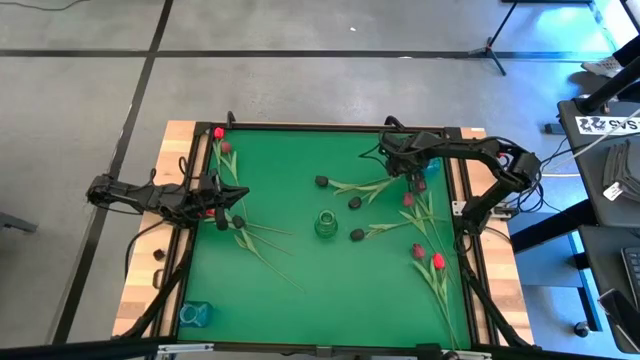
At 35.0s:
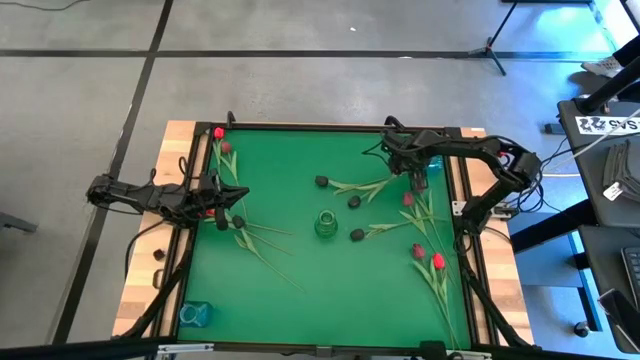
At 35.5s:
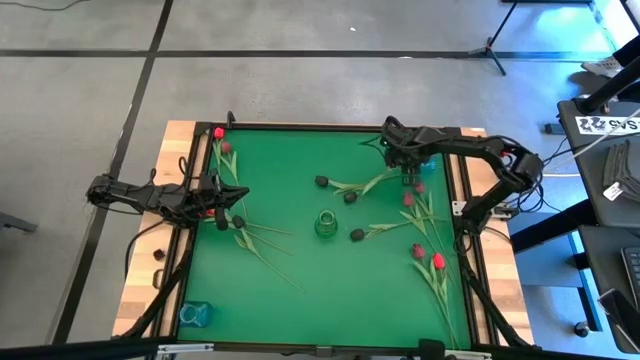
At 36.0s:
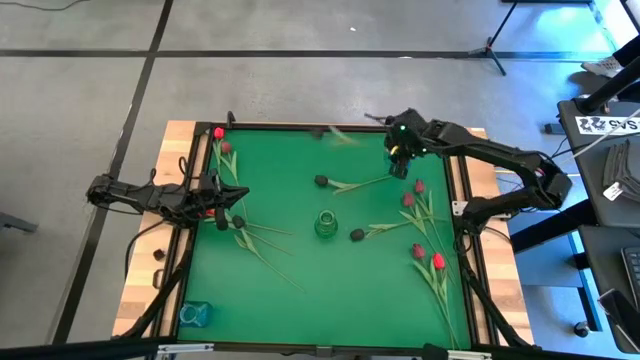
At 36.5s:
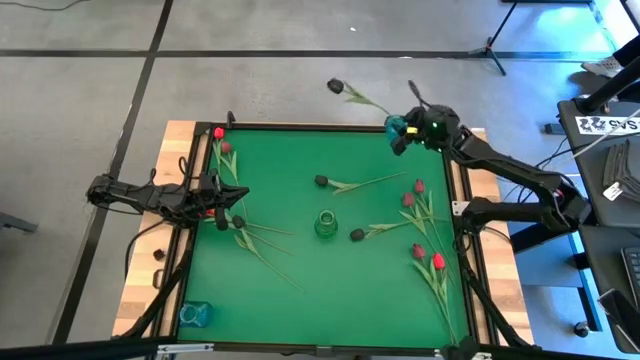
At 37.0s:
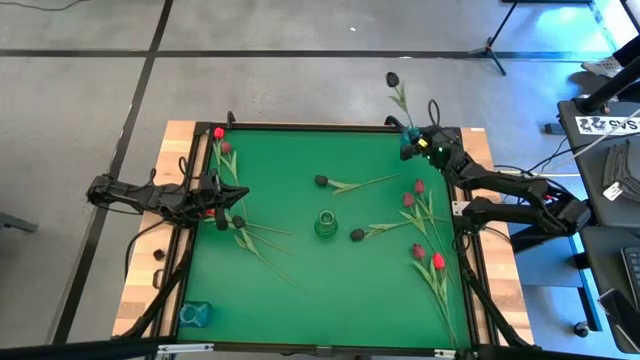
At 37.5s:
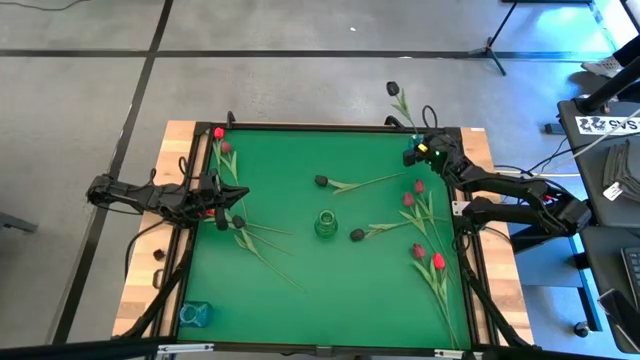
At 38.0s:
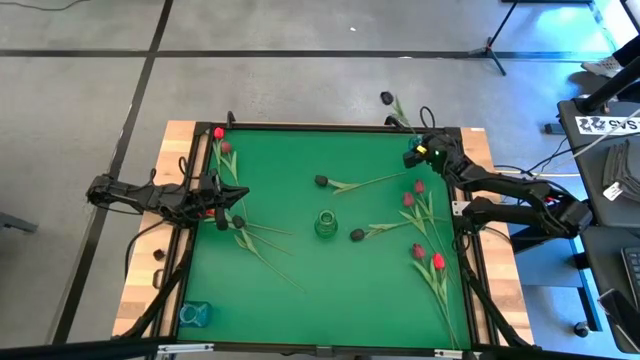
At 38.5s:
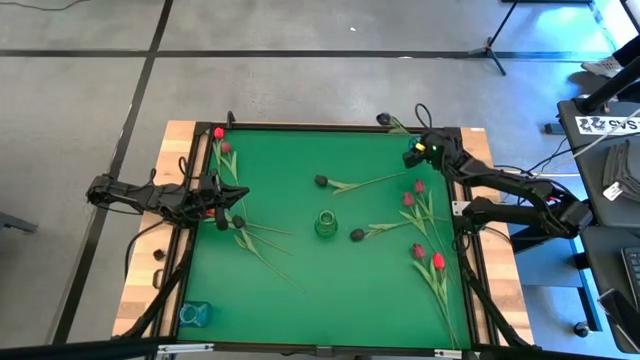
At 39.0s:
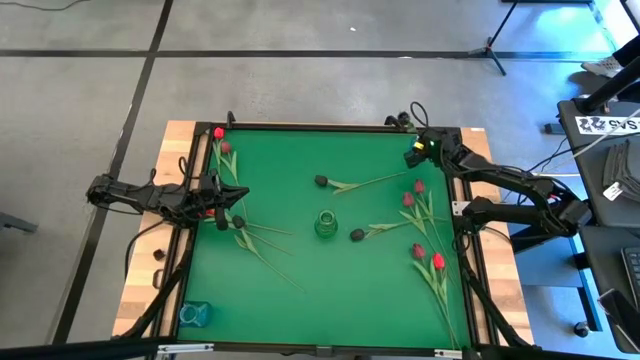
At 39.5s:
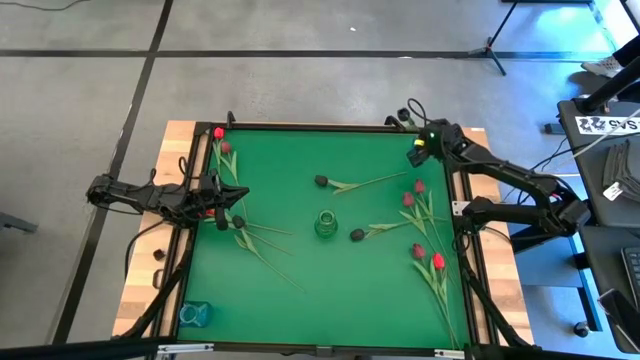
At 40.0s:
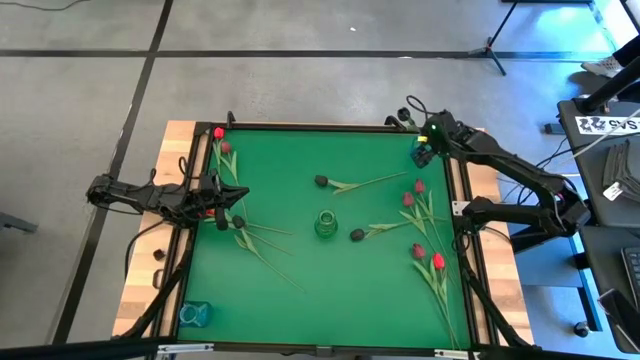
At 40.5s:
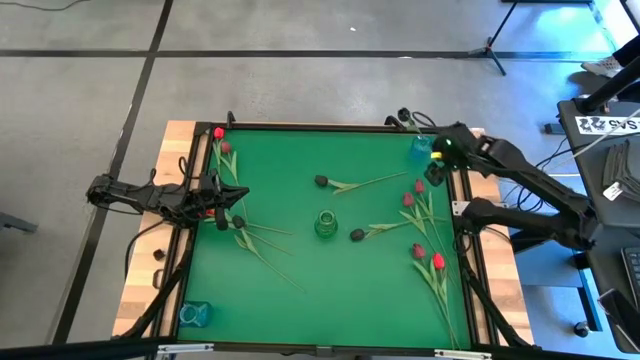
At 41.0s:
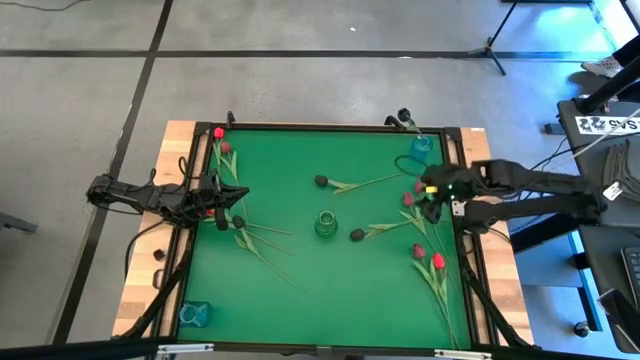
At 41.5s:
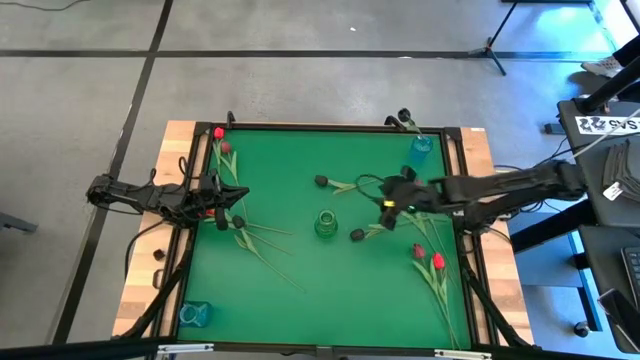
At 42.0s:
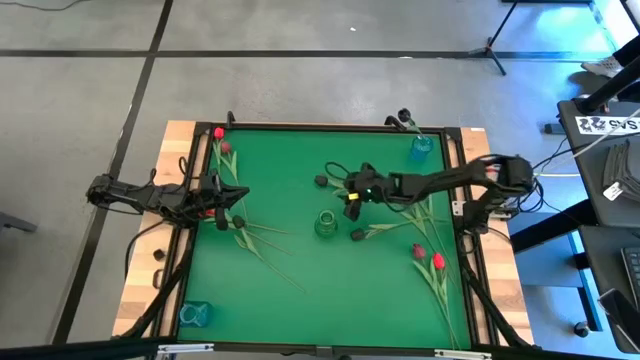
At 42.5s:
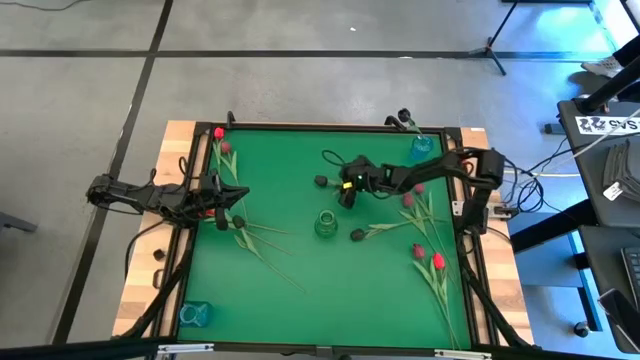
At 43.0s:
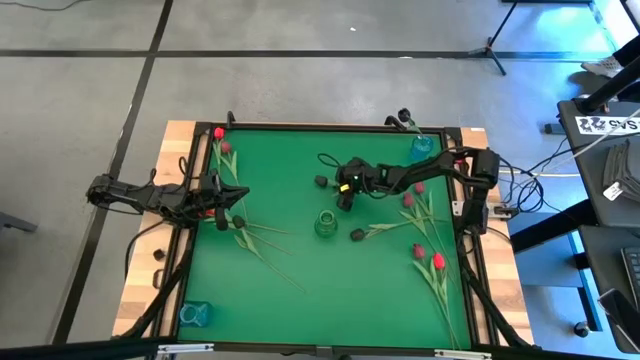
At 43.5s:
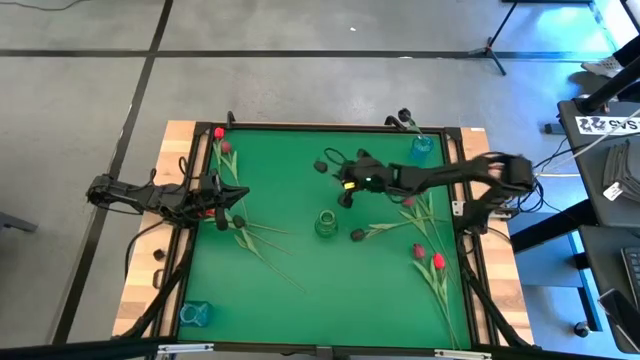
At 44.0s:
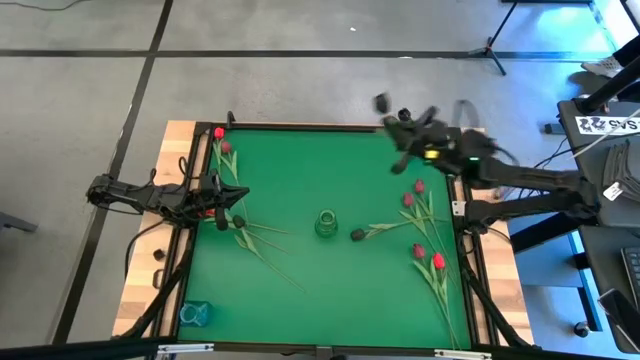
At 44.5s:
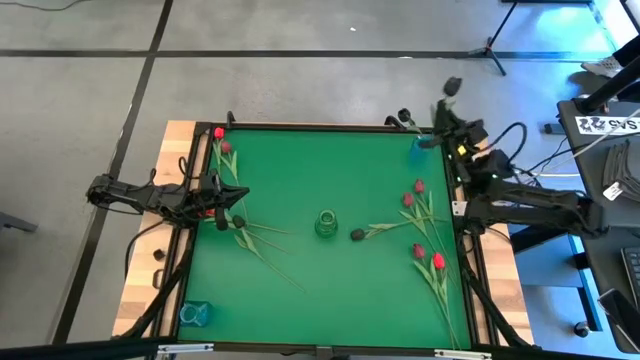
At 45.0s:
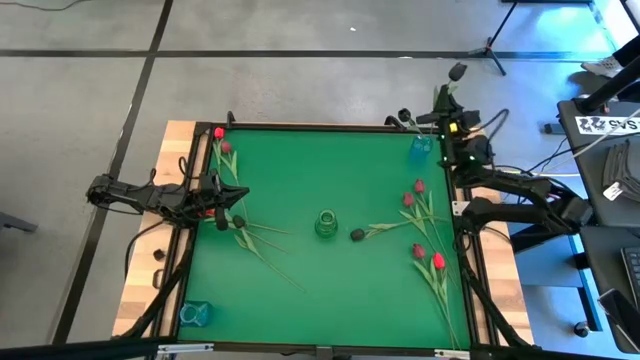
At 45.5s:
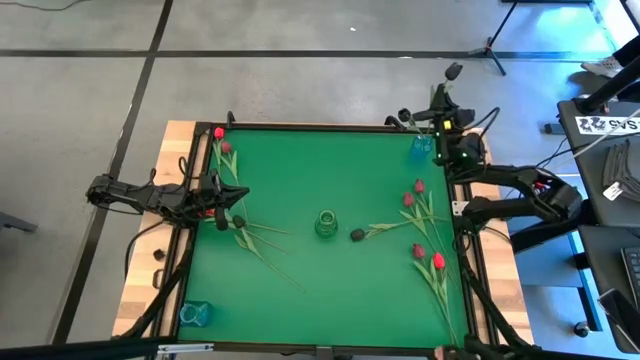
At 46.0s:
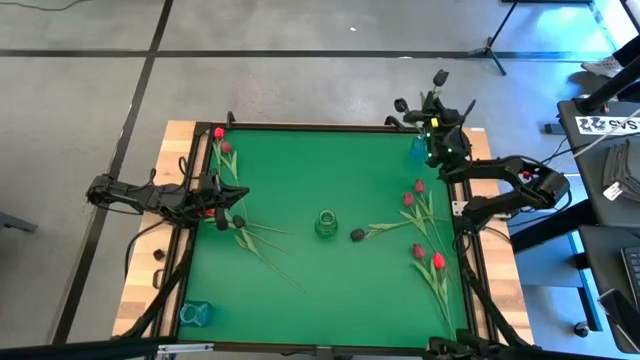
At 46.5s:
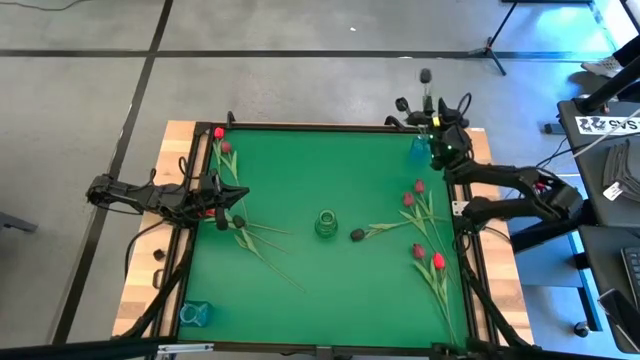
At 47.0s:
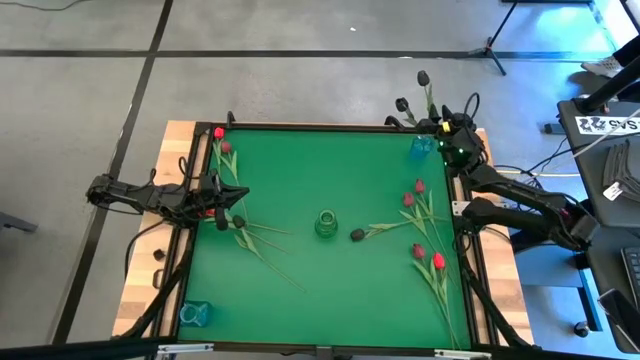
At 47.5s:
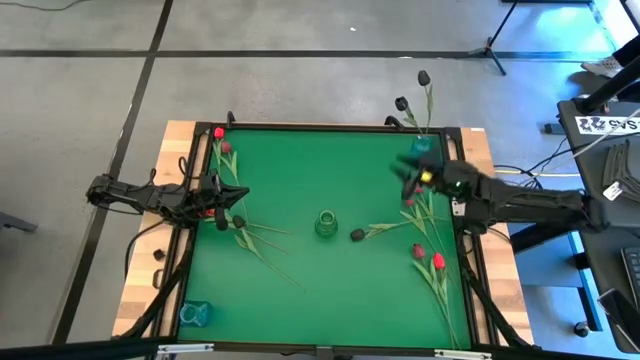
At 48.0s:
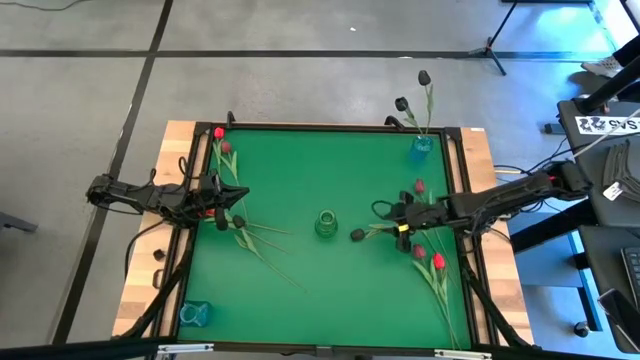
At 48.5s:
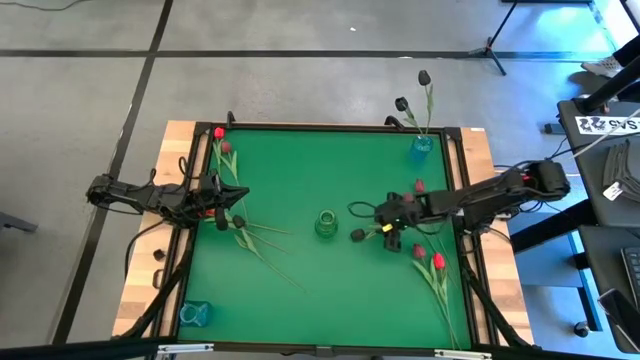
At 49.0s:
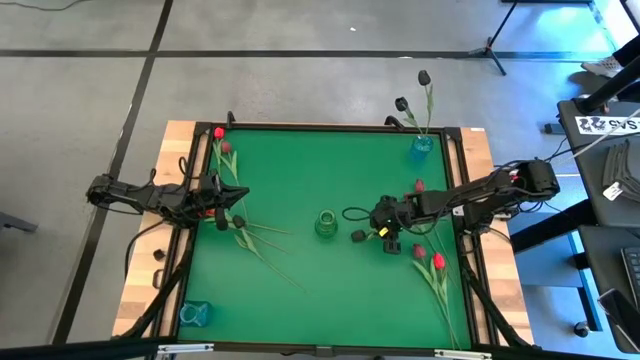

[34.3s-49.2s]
Task: Sort flowers into vase by color
Put the right black flower into the top right blue vase

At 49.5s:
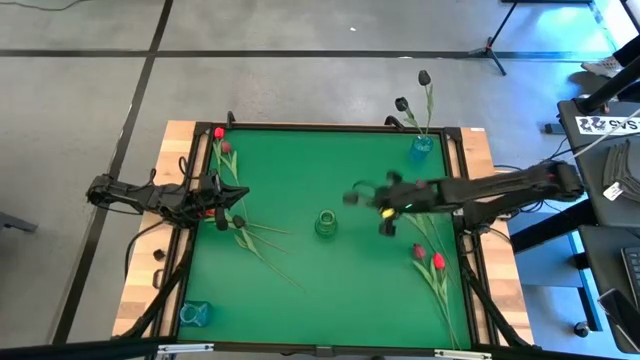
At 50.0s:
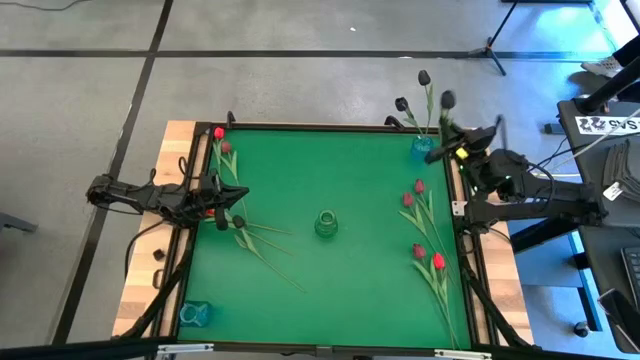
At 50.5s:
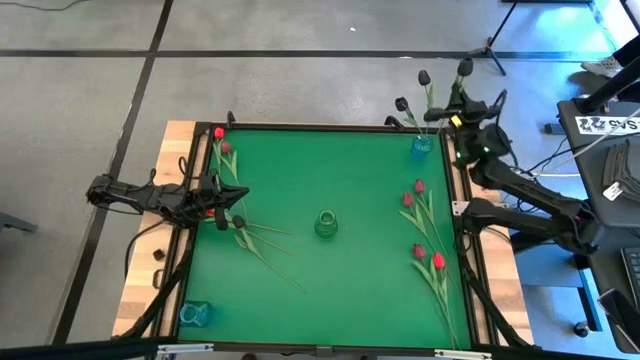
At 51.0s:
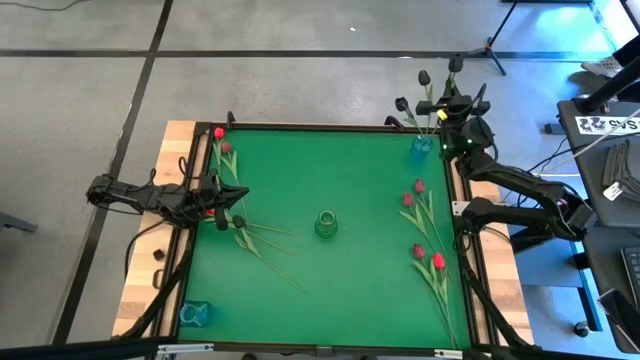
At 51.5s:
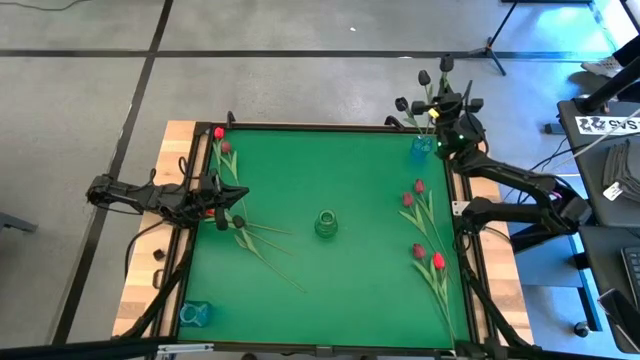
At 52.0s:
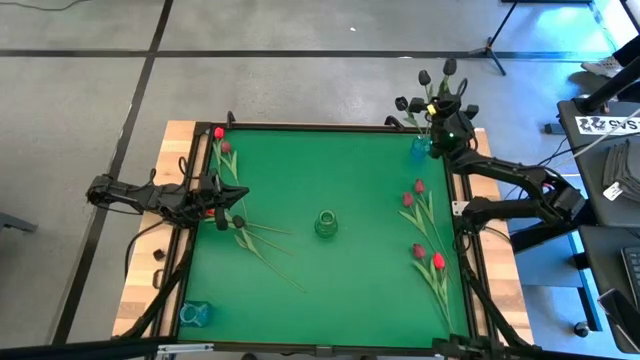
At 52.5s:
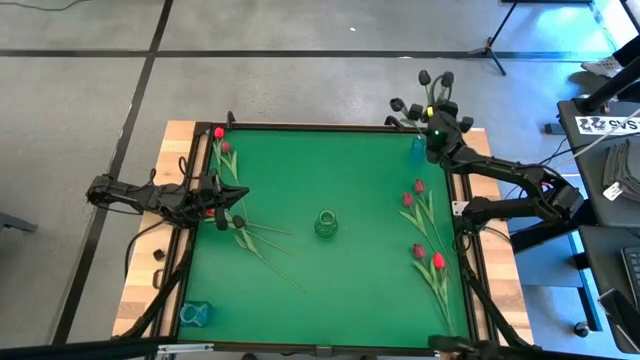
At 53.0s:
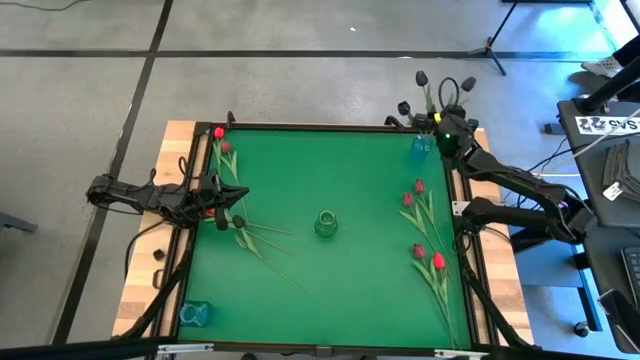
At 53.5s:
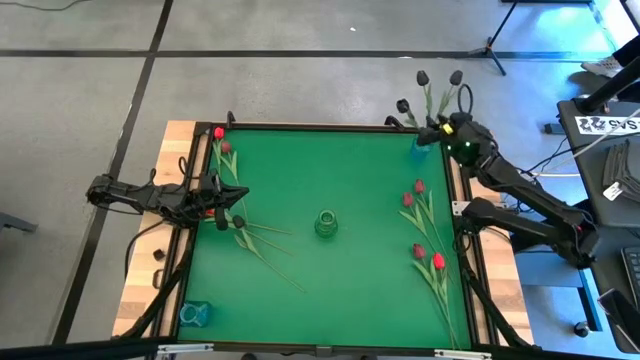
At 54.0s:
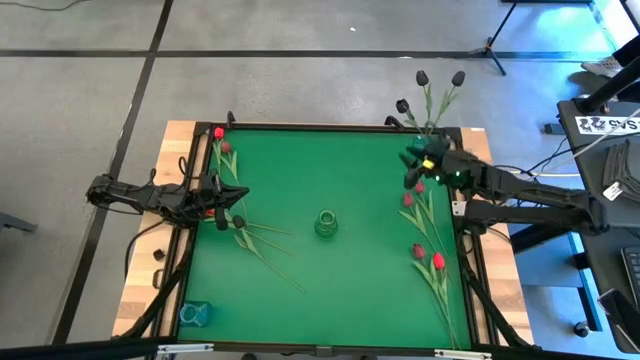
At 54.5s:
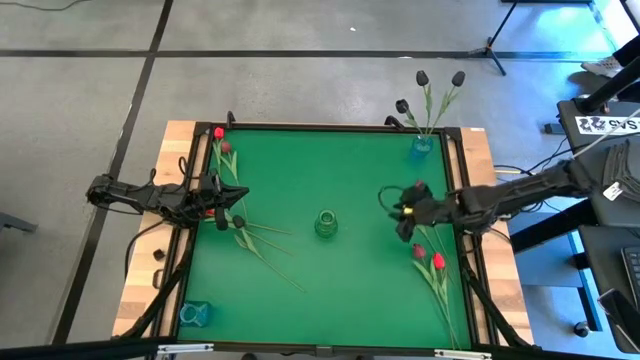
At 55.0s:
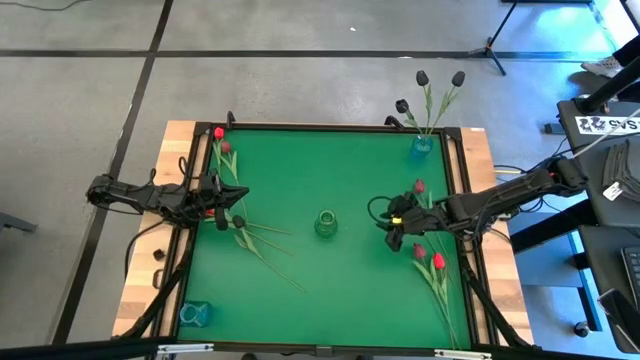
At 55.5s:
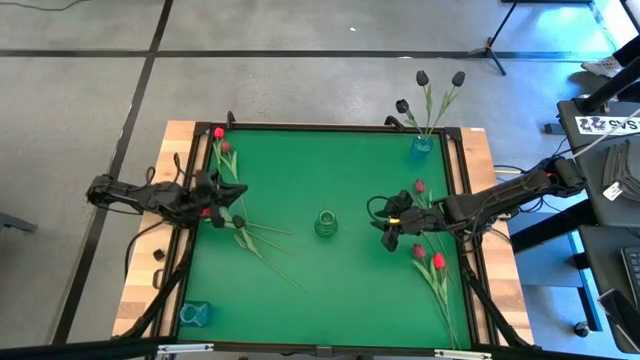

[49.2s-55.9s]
Put the right black flower into the top right blue vase
